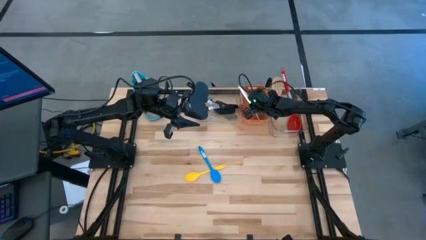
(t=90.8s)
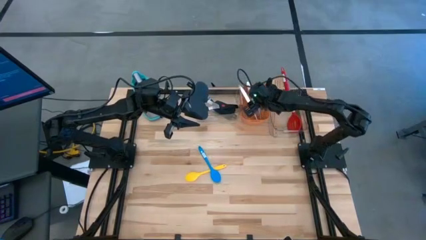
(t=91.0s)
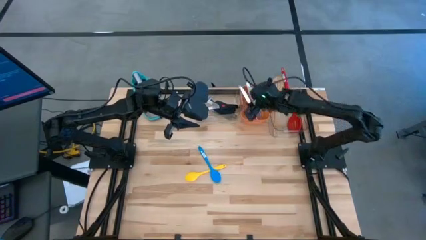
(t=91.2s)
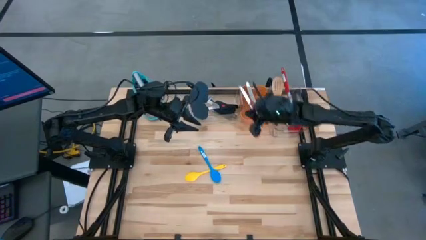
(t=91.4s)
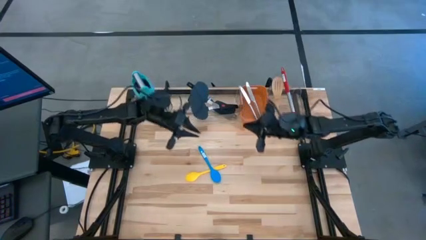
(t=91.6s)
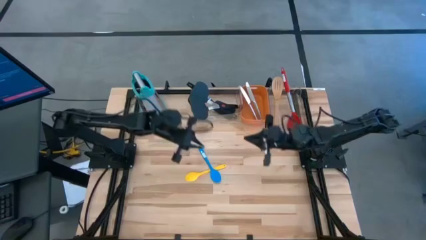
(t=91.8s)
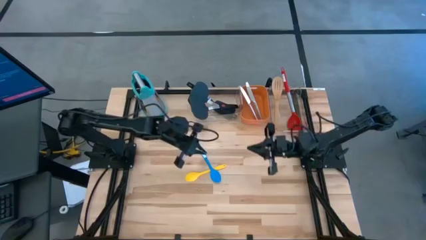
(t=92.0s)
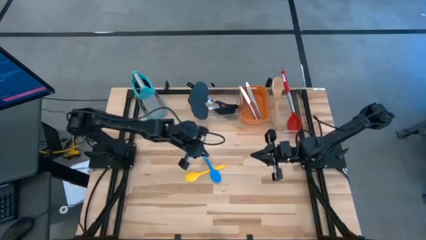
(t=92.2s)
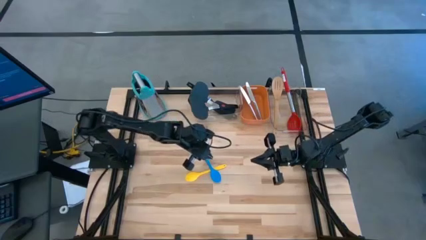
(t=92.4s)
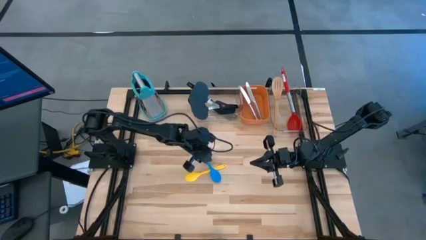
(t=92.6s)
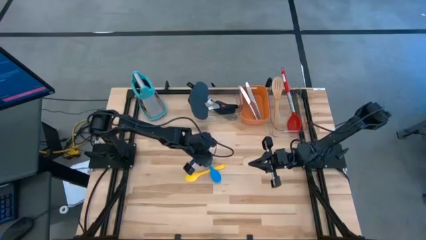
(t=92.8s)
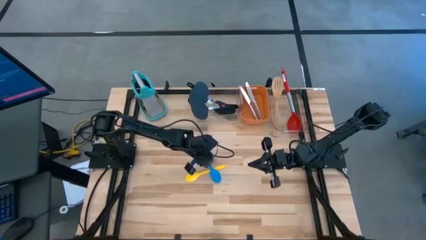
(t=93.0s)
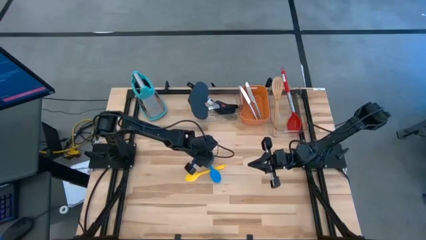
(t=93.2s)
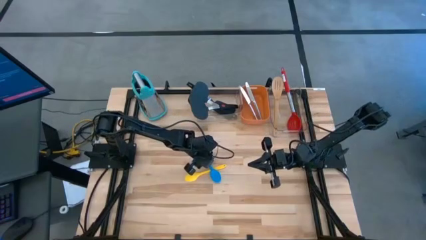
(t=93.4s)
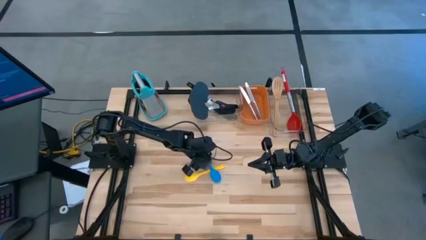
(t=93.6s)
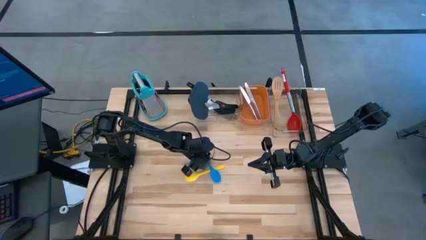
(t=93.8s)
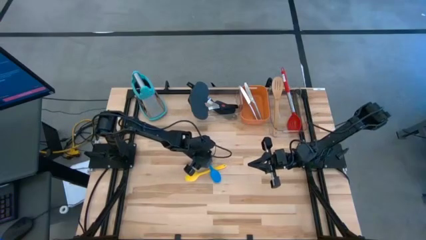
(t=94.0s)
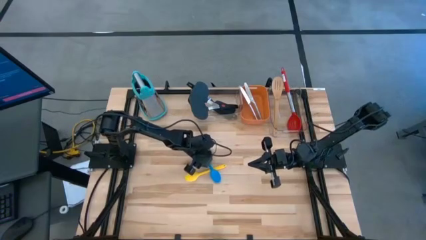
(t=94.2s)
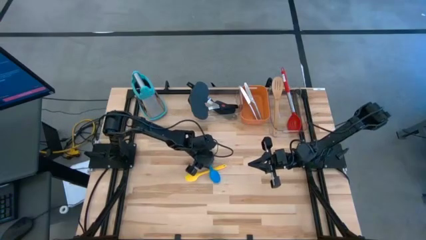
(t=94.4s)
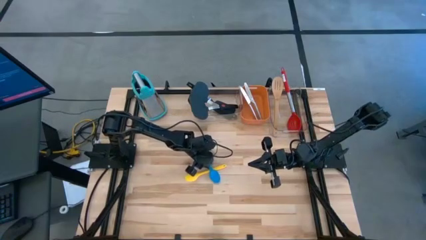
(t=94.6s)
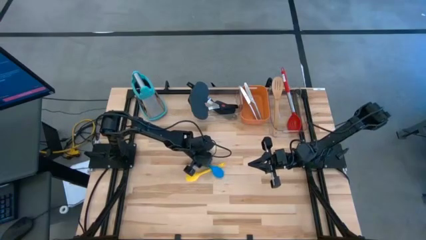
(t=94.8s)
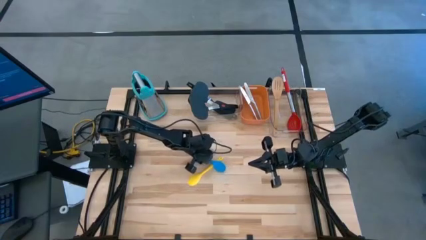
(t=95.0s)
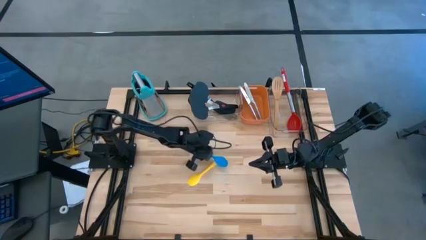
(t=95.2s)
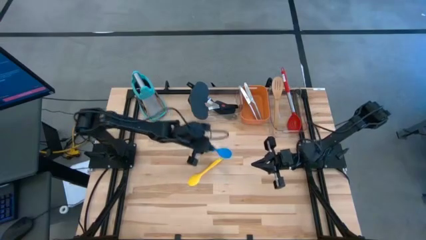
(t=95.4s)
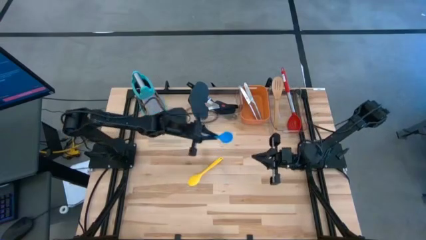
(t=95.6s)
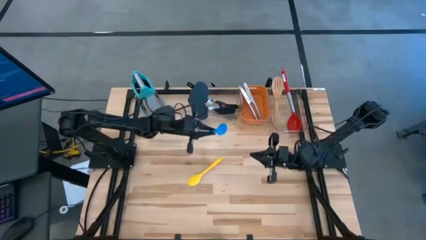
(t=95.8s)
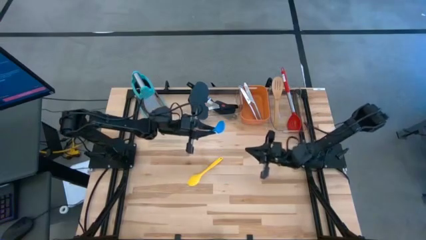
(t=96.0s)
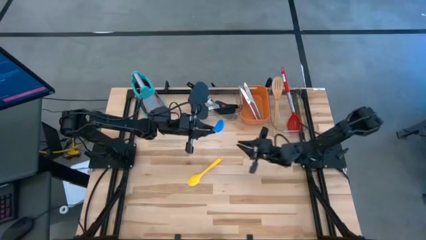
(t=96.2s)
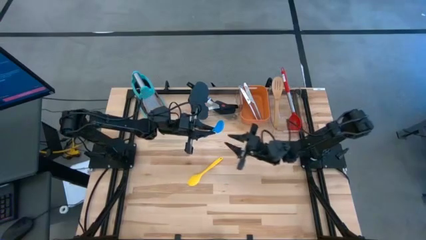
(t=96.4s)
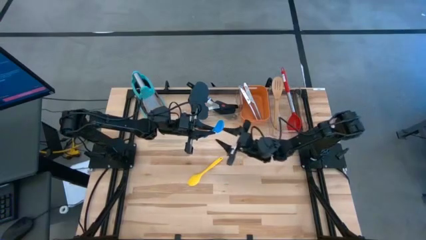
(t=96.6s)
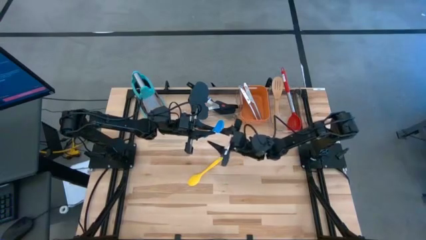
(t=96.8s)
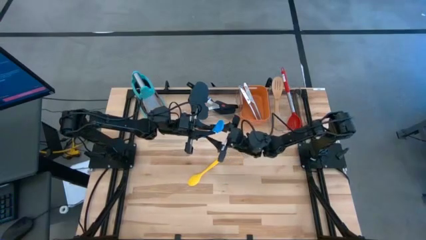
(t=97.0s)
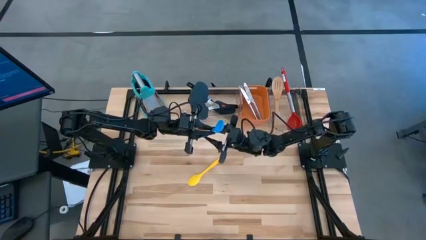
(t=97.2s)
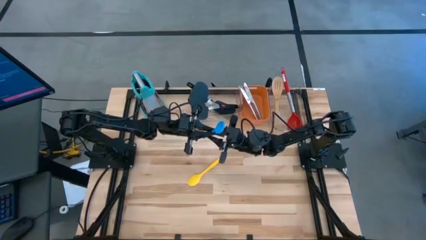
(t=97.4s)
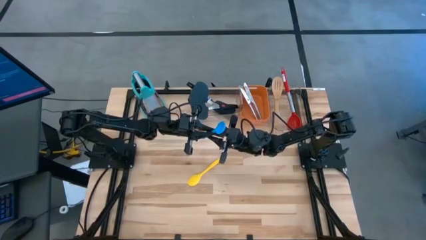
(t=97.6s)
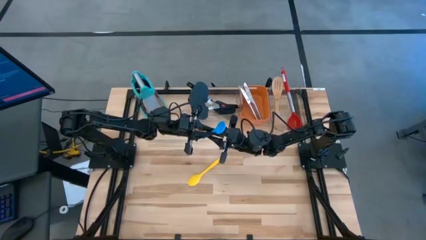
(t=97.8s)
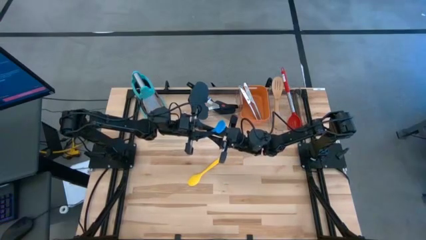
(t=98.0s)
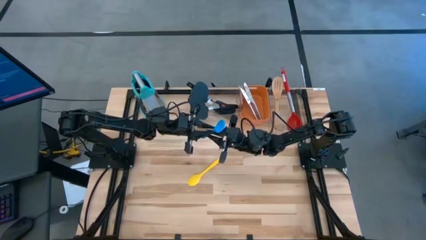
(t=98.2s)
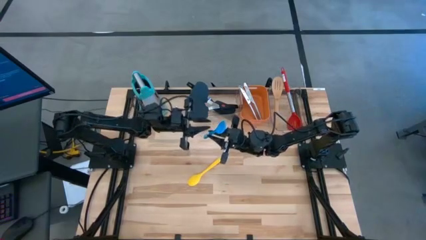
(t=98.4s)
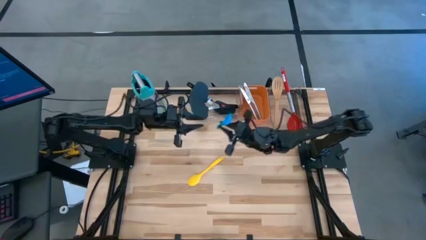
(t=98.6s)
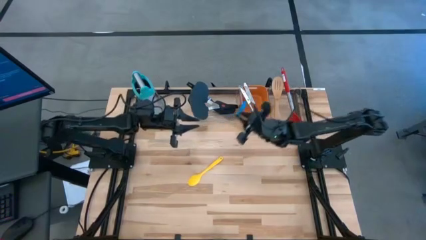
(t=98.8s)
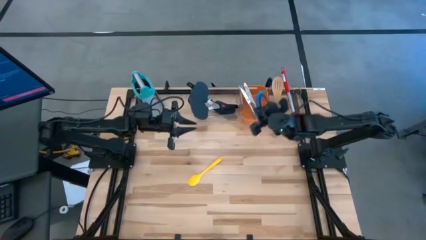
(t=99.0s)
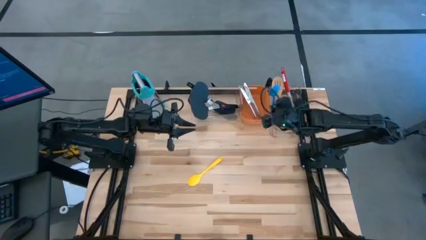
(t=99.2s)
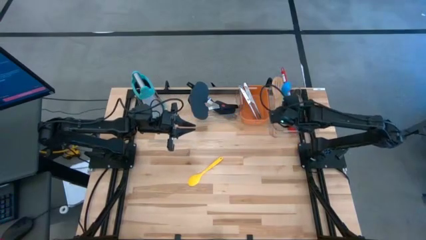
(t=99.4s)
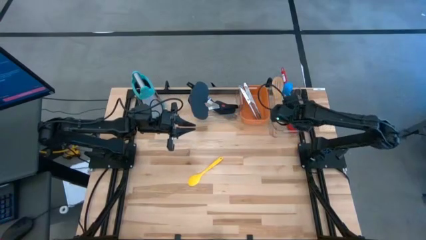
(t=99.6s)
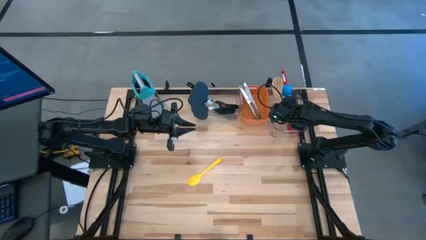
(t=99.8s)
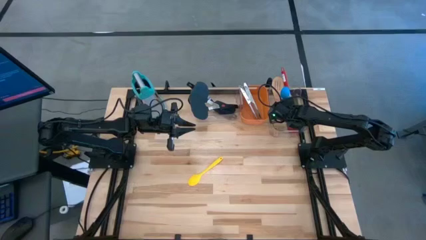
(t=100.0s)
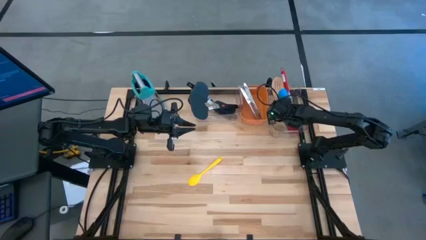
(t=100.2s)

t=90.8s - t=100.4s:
Task: Pick & Place Kitchen Items
Put the blue spoon in the right transparent bin
